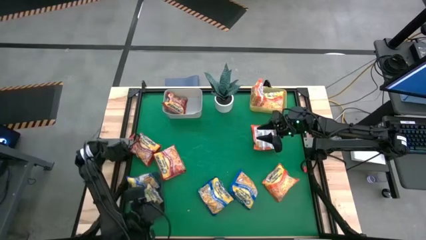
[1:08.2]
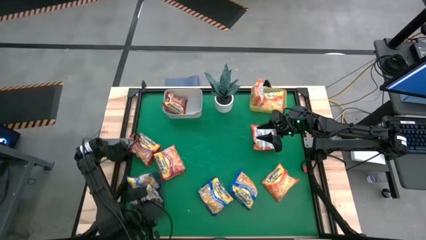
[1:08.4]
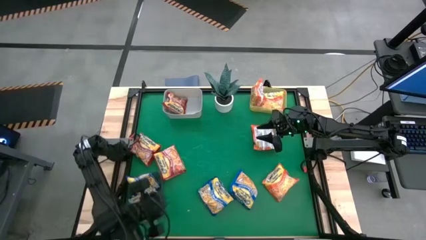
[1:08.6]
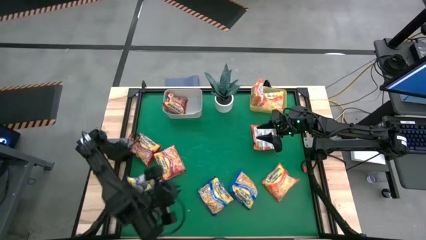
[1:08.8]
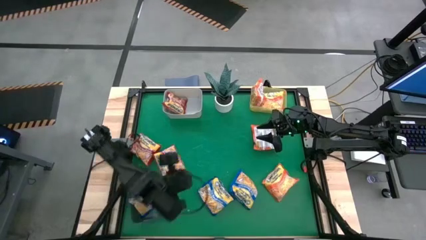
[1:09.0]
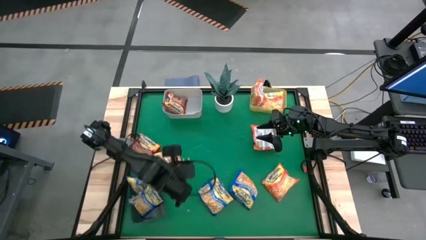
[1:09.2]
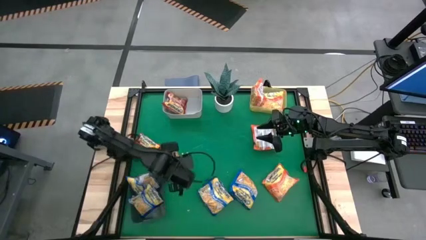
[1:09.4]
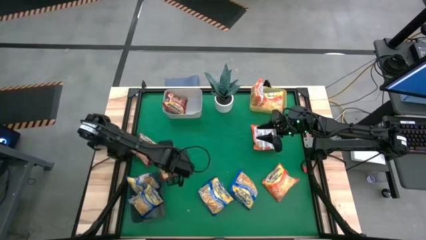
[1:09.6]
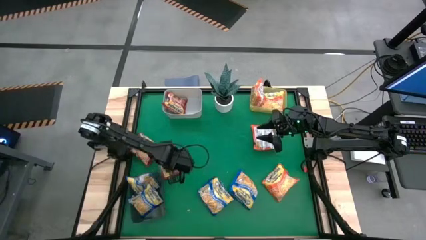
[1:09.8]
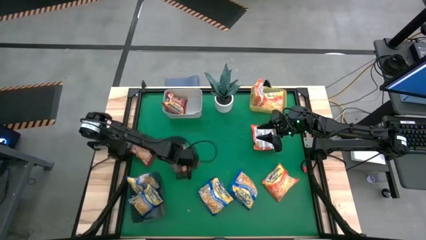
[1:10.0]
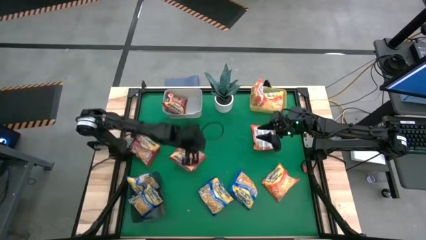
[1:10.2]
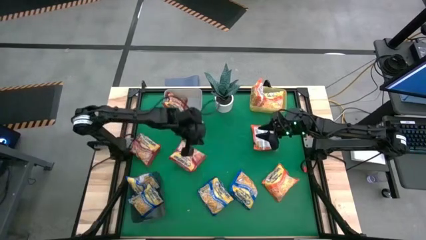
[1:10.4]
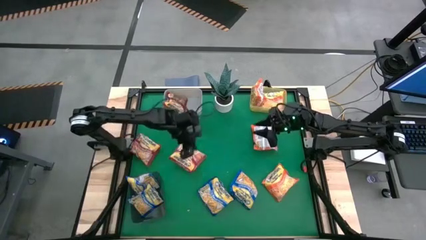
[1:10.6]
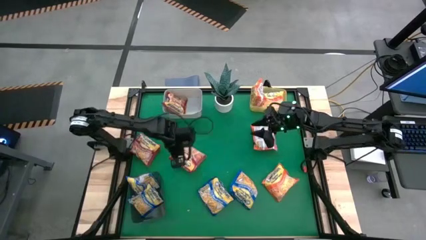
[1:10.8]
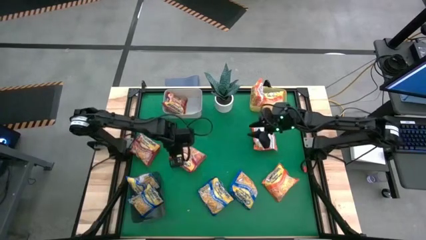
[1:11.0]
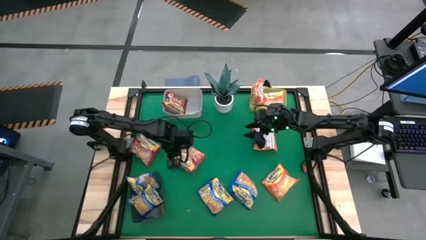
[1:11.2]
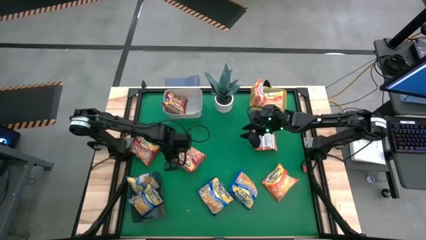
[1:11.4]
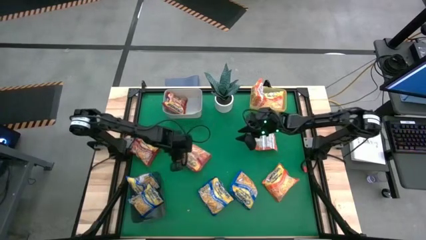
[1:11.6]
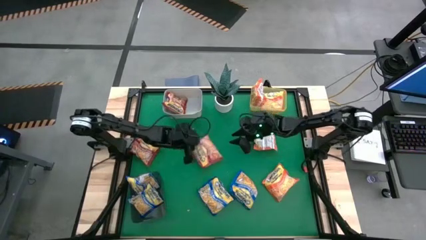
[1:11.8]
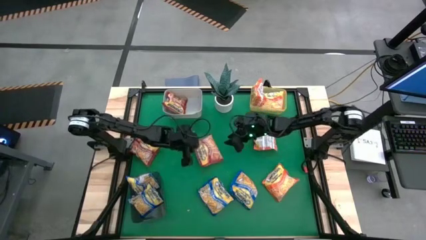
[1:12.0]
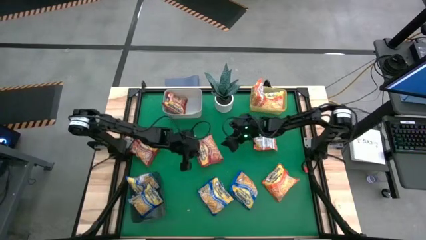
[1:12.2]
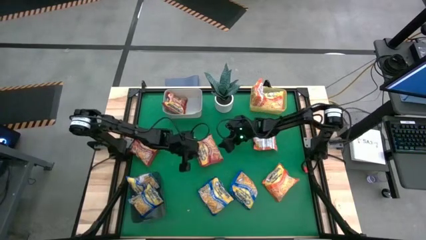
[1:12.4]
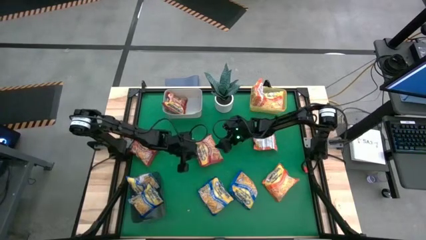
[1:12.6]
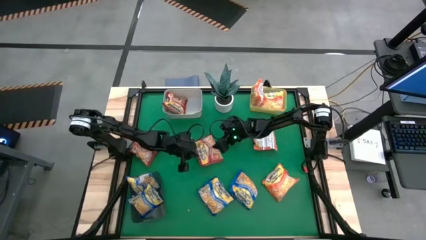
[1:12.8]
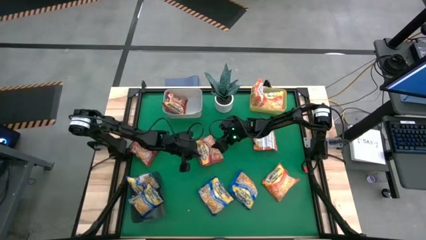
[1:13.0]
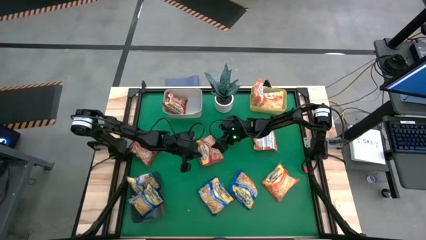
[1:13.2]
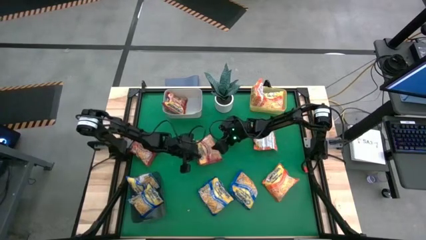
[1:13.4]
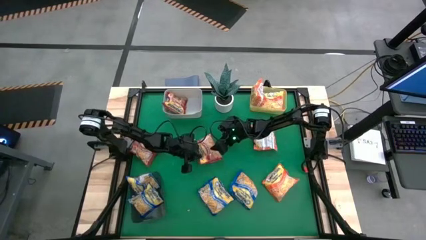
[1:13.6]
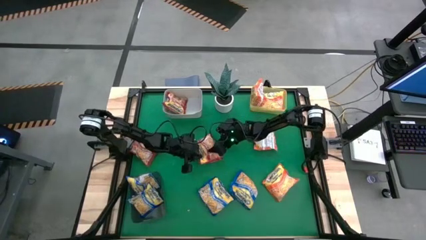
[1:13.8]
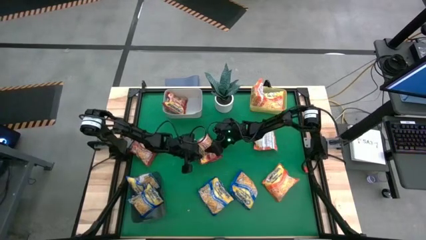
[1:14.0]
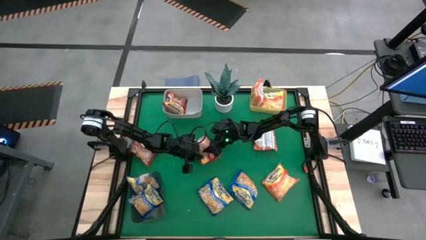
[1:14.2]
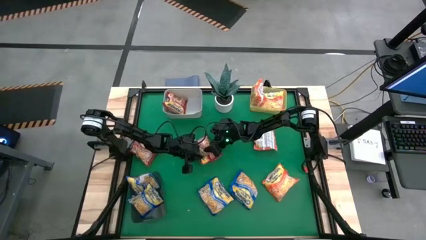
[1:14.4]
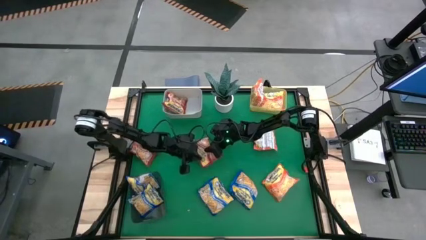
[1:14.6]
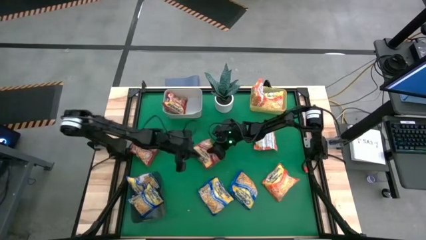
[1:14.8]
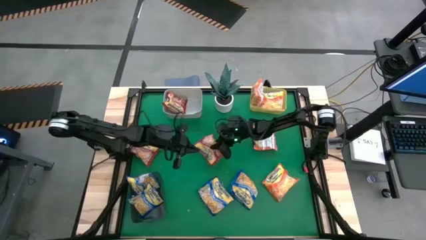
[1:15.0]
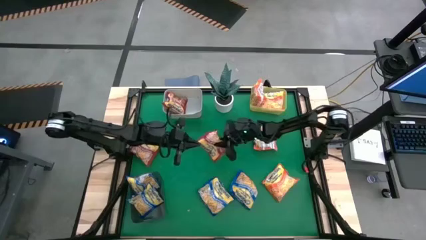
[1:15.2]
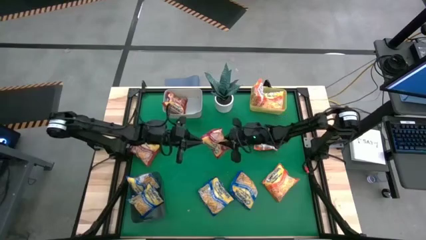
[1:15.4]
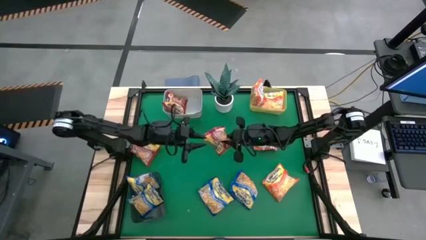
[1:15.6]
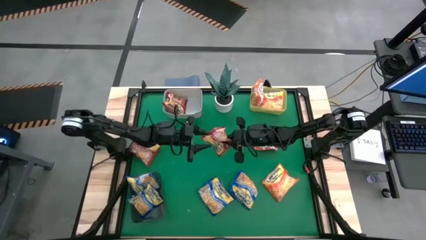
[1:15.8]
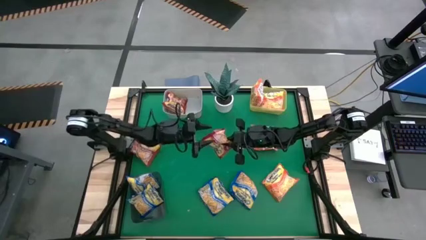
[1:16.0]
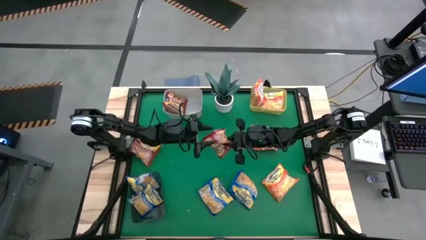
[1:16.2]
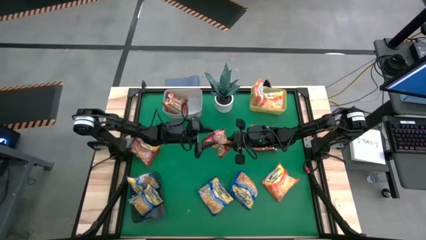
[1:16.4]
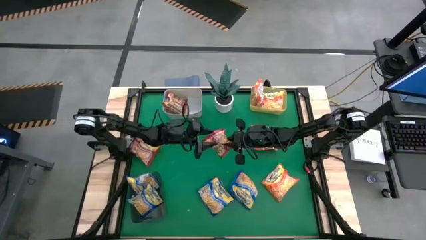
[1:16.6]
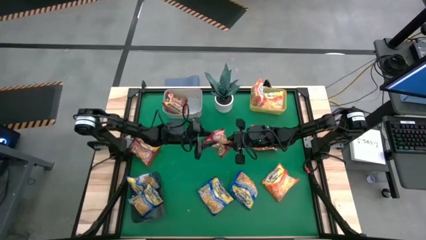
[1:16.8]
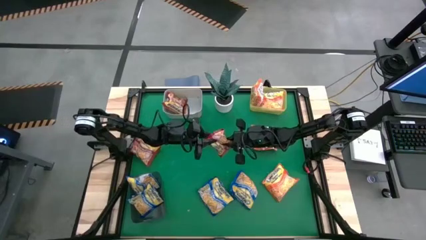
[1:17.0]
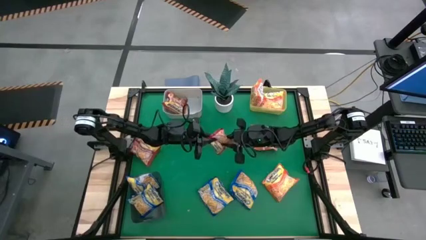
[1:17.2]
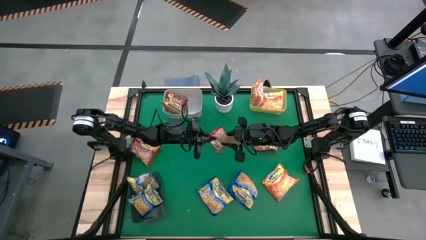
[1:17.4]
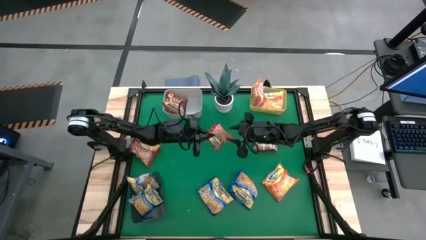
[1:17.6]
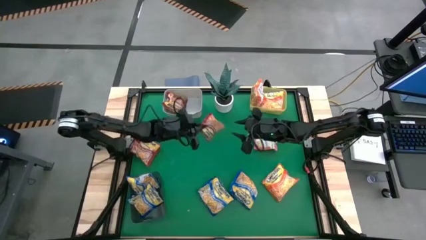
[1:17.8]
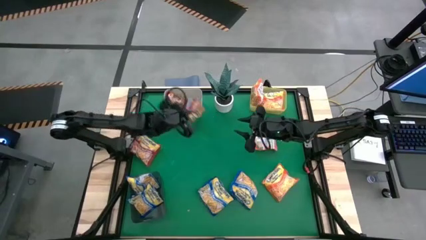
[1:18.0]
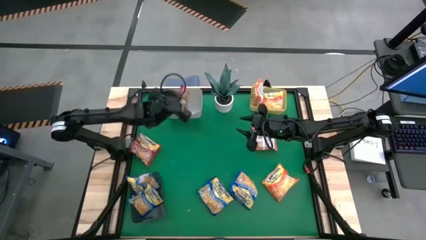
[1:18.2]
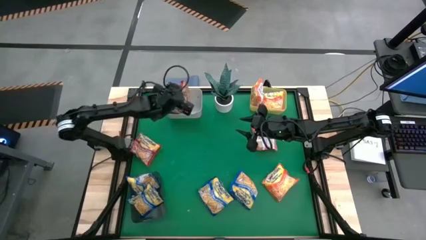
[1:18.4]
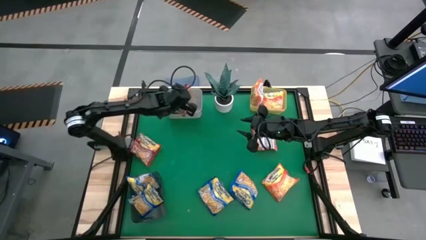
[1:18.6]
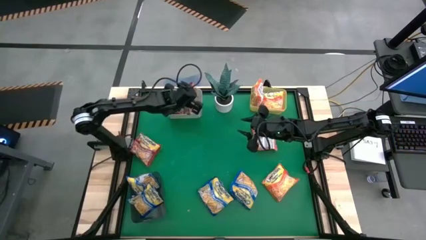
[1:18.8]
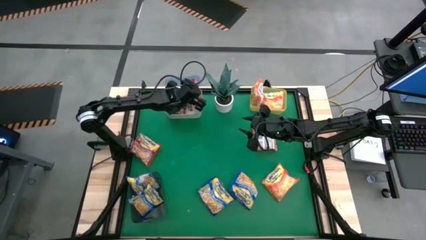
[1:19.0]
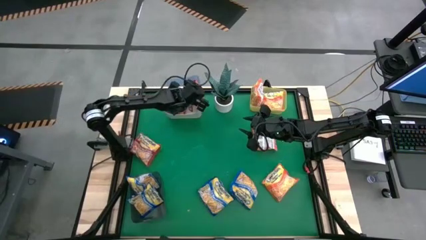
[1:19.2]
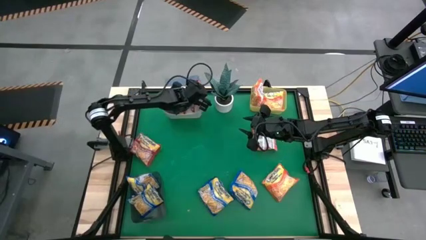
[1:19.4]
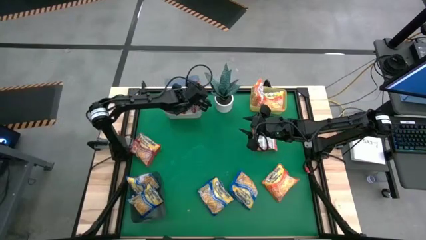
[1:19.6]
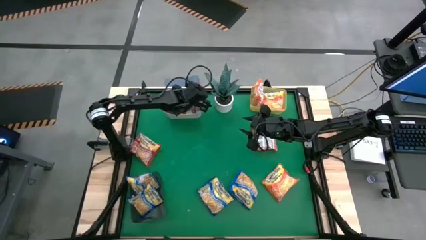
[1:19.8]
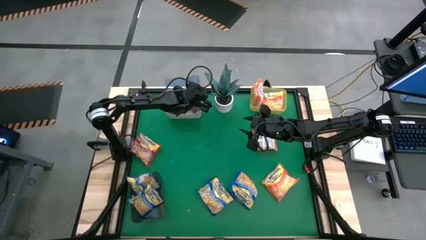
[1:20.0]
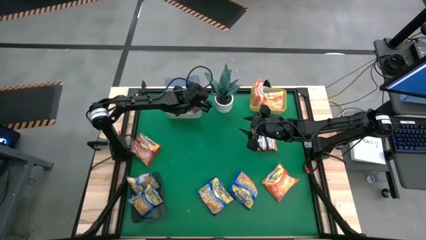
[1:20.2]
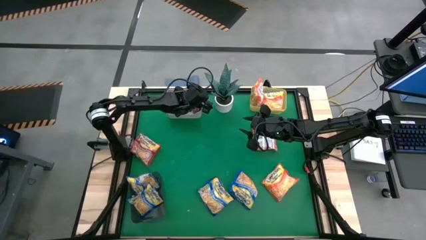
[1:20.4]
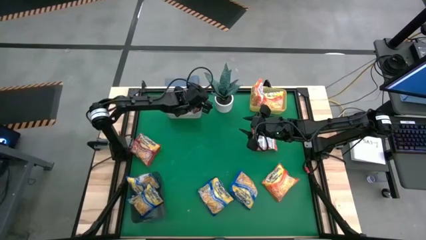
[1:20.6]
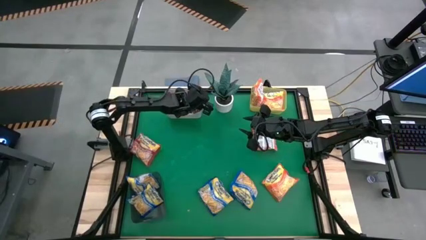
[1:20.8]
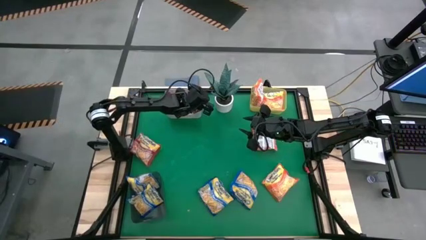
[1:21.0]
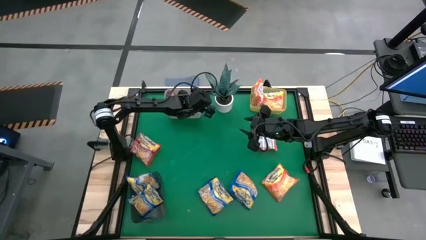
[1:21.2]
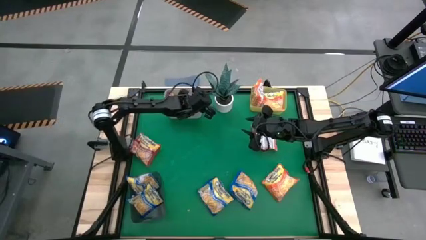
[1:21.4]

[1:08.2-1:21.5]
Task: Sort Maruchan noodles
Put the center red noodle pack into the white bin
